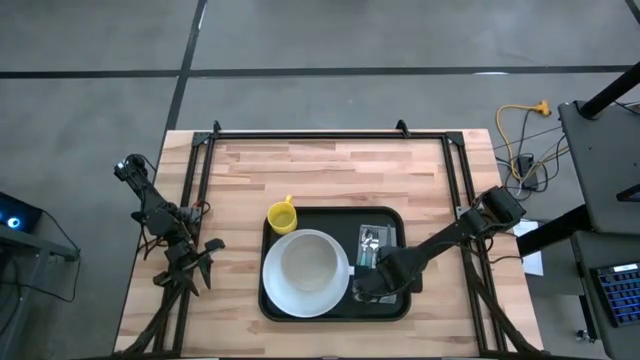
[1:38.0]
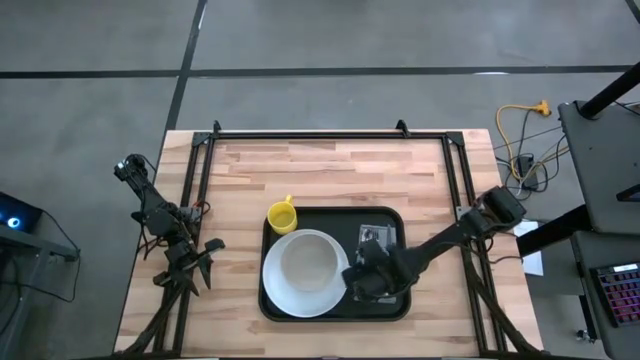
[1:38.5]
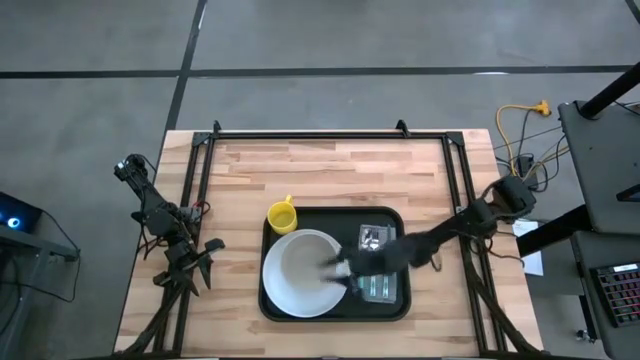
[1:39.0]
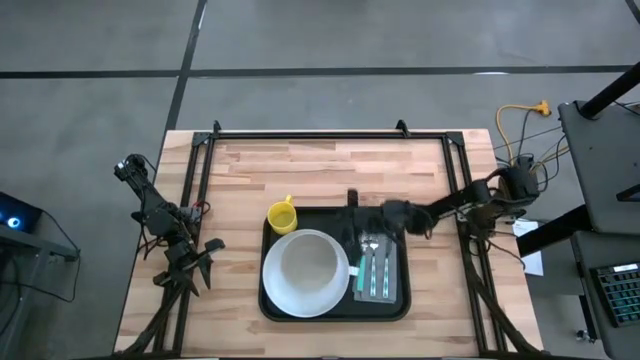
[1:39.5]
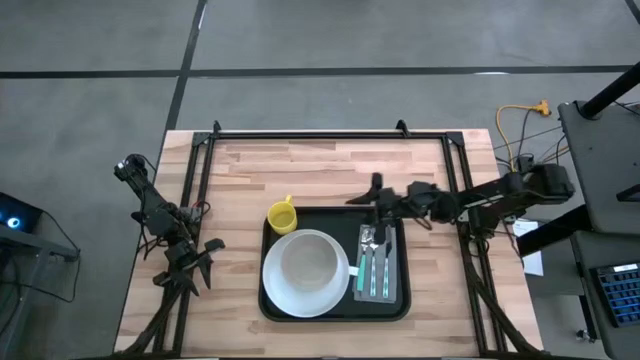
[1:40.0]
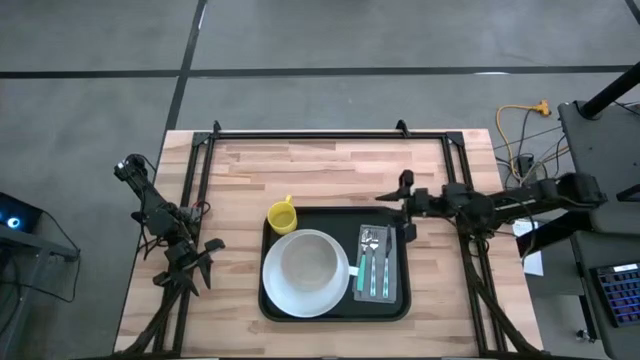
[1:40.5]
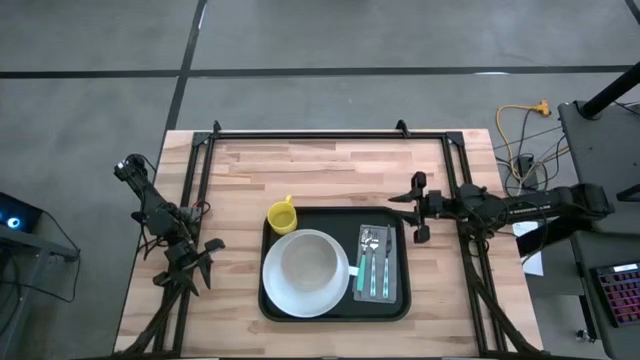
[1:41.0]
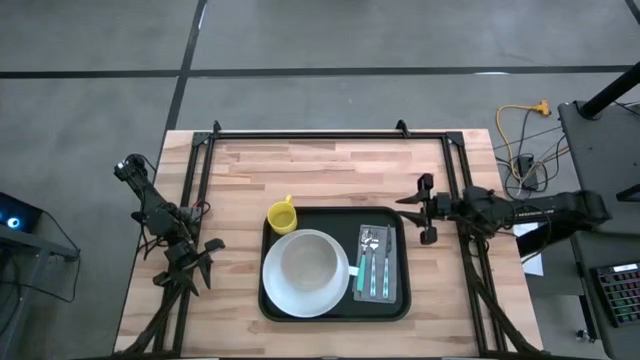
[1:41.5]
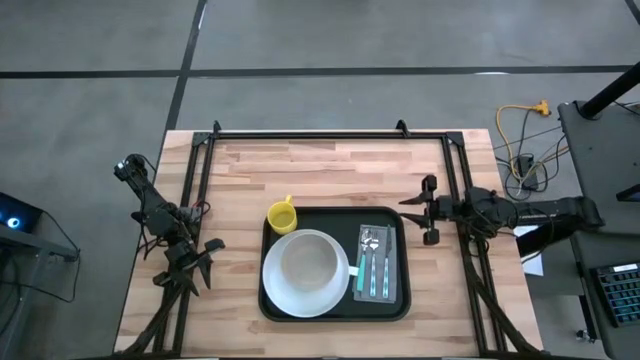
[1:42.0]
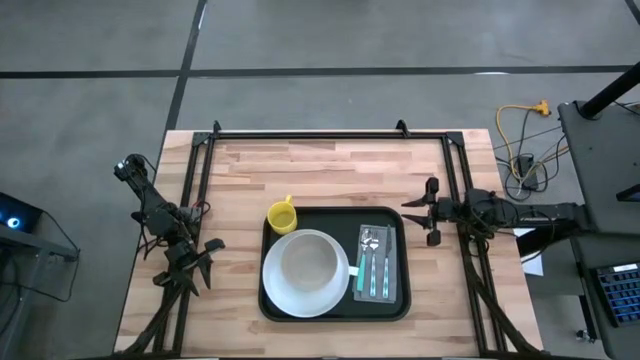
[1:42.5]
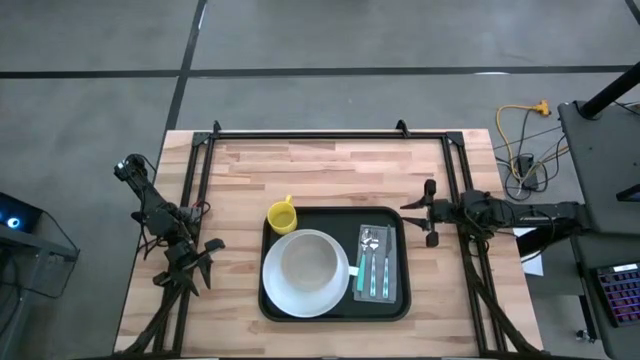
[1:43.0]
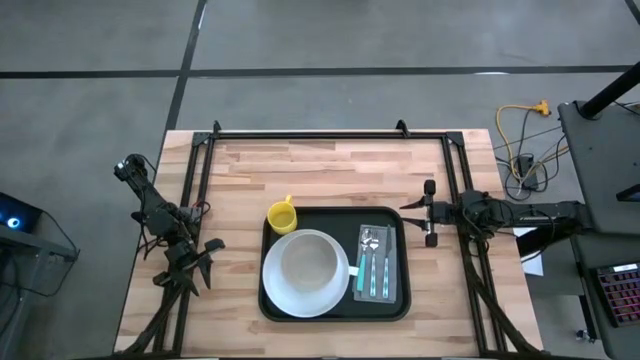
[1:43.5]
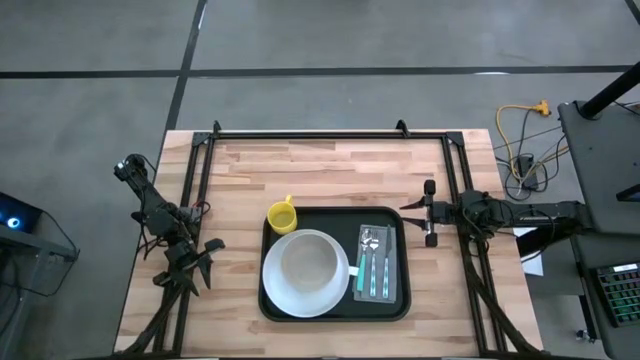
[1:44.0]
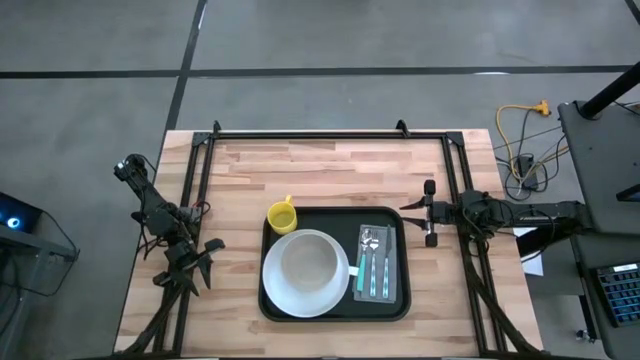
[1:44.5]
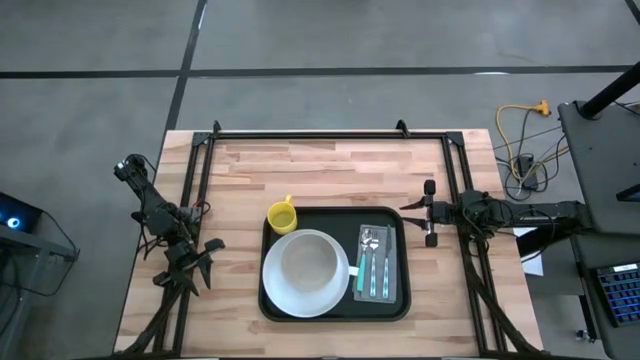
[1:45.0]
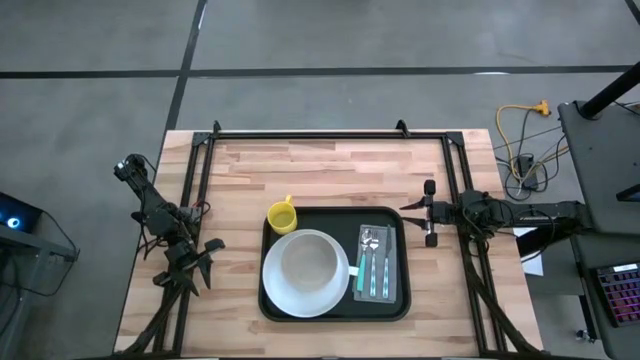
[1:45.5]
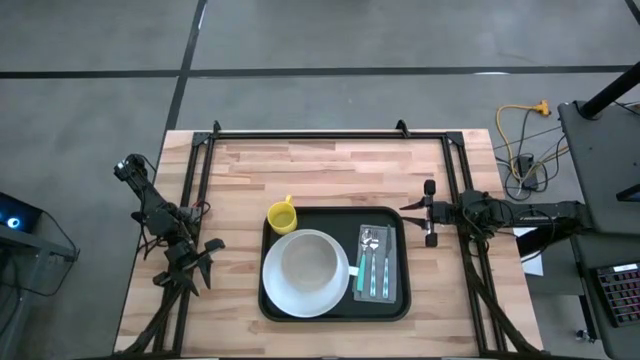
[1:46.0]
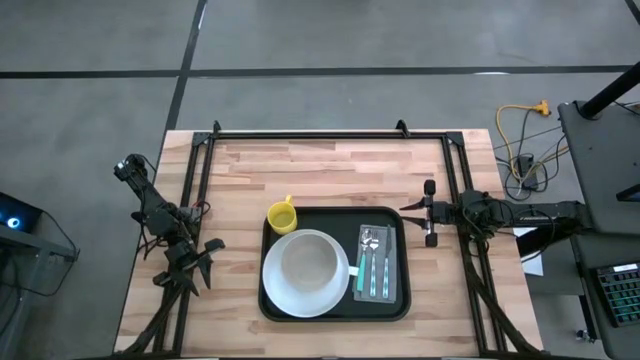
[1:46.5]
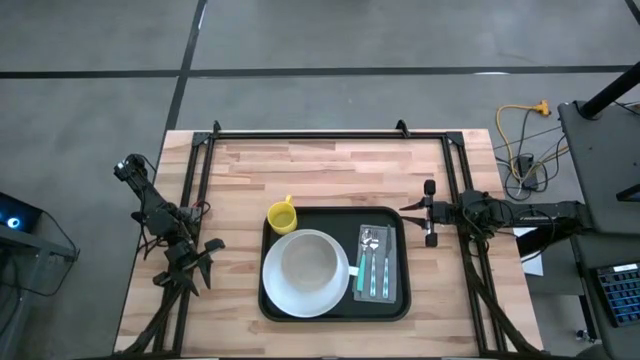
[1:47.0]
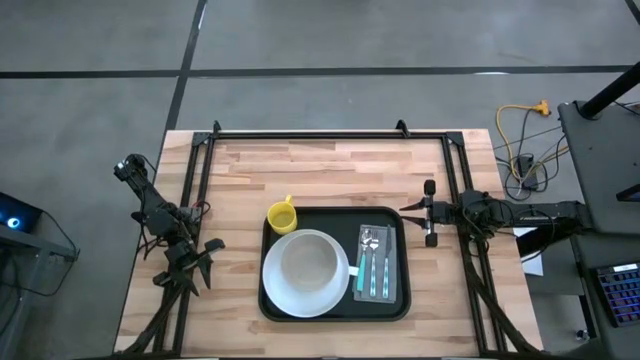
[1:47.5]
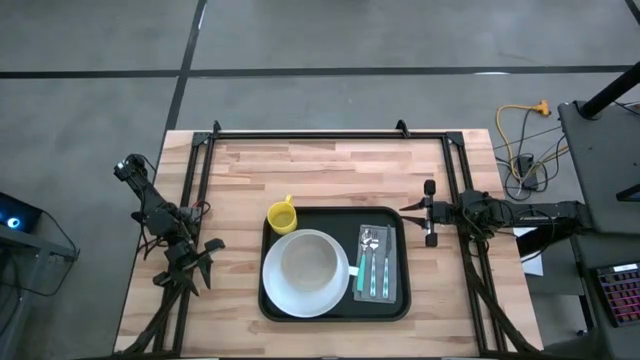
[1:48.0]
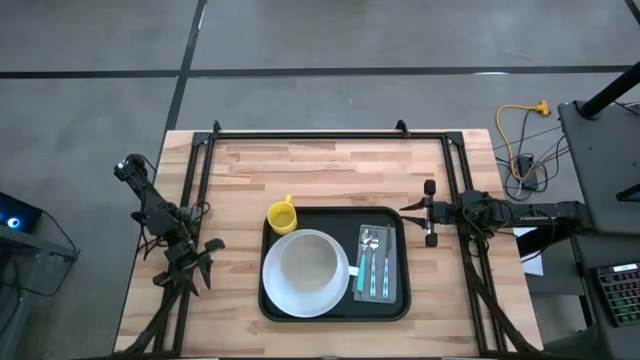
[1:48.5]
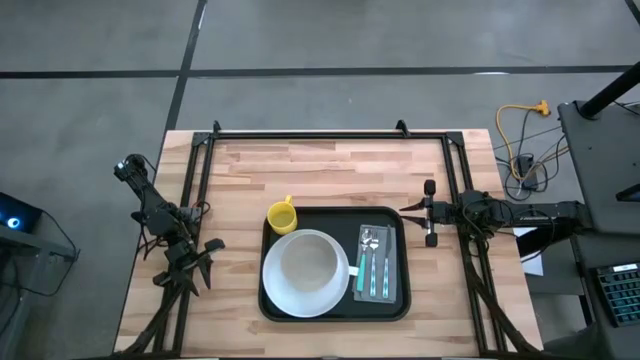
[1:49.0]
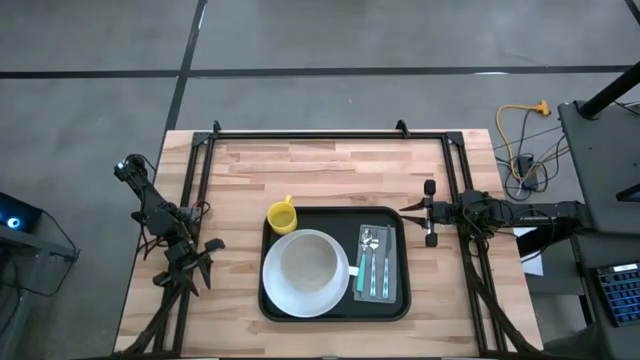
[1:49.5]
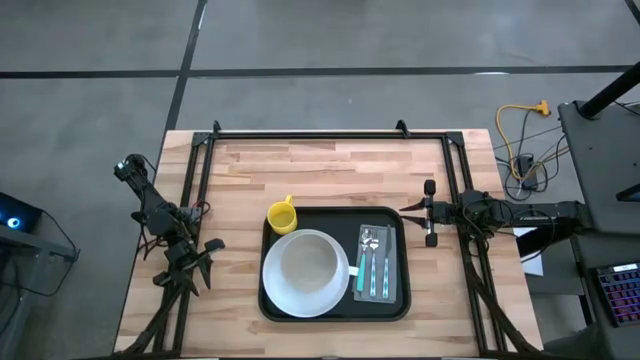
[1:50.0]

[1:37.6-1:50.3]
Task: Set up tray
Return to Home Position
